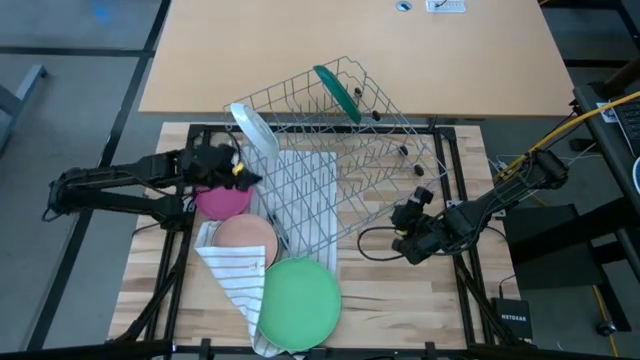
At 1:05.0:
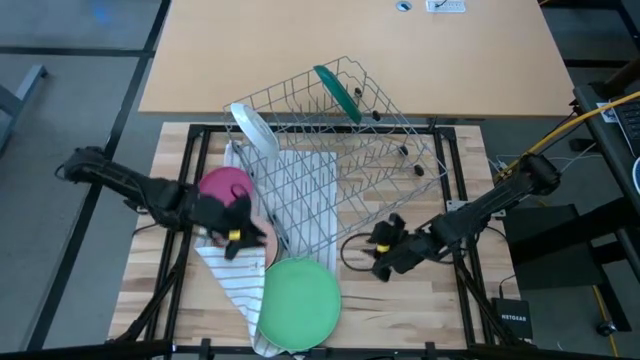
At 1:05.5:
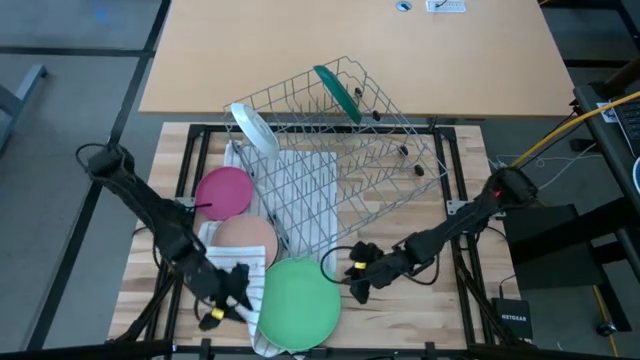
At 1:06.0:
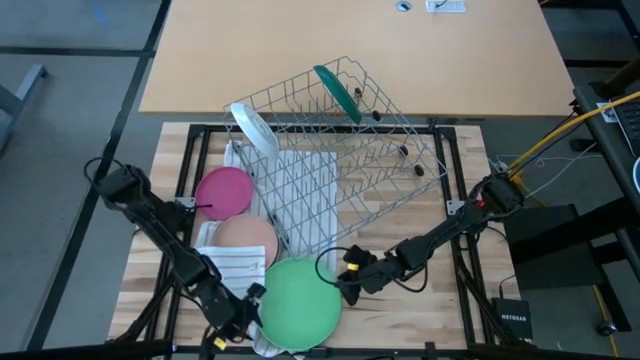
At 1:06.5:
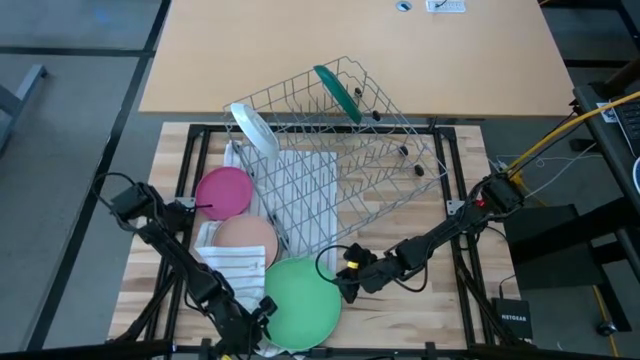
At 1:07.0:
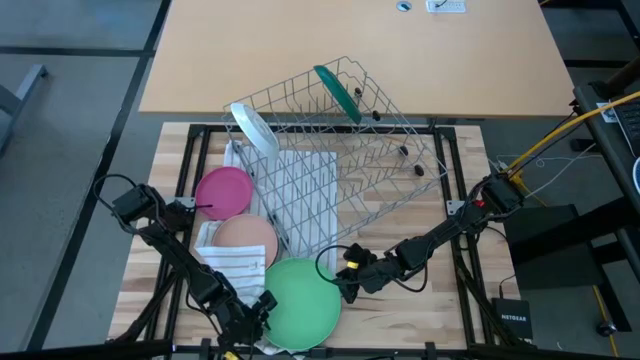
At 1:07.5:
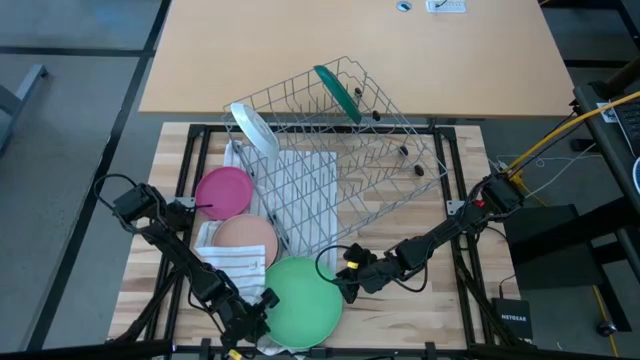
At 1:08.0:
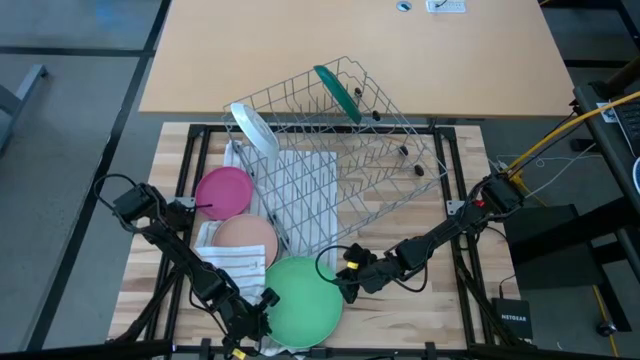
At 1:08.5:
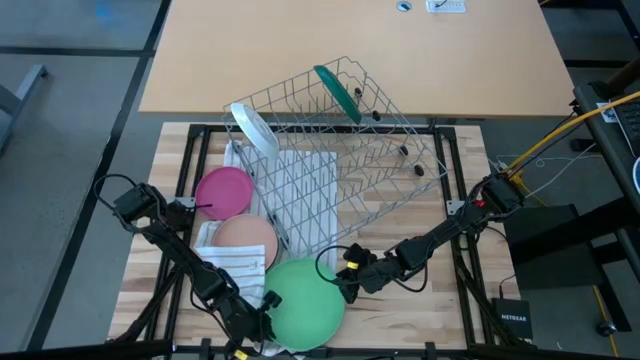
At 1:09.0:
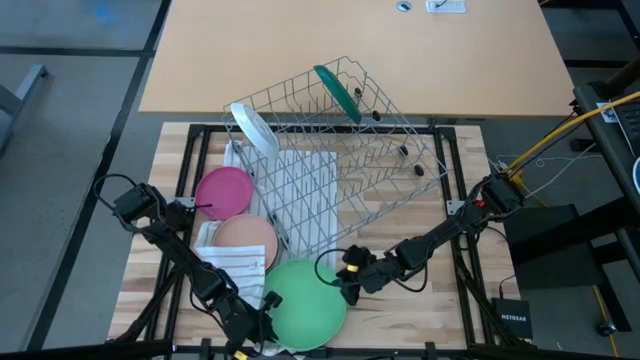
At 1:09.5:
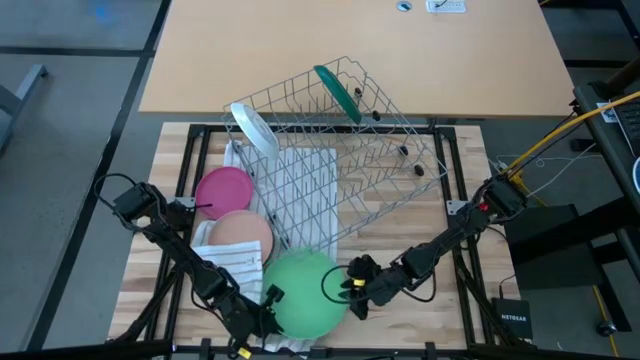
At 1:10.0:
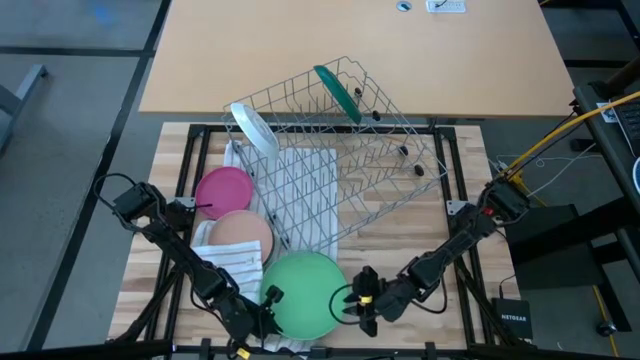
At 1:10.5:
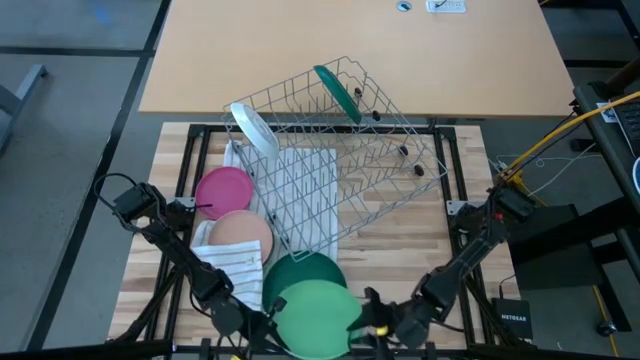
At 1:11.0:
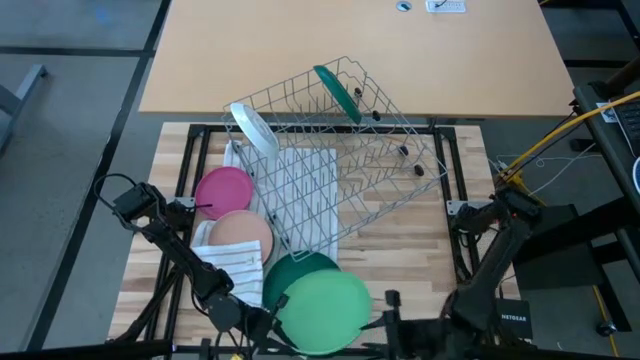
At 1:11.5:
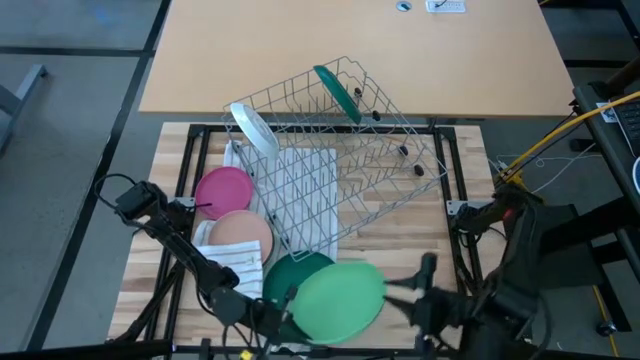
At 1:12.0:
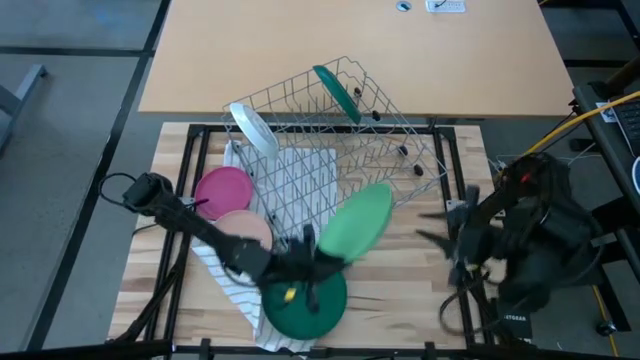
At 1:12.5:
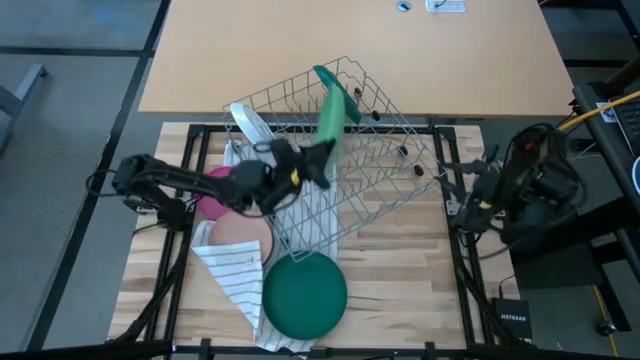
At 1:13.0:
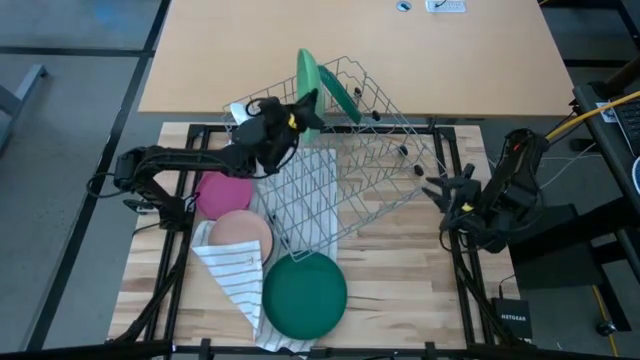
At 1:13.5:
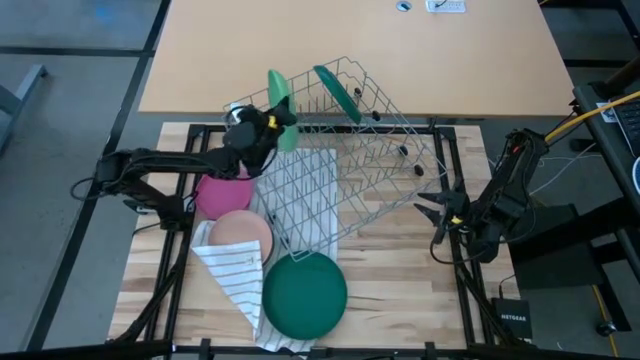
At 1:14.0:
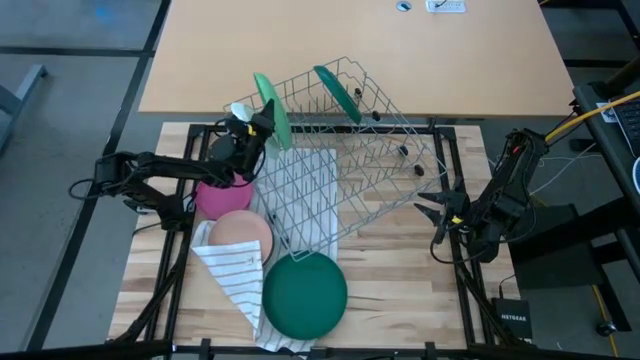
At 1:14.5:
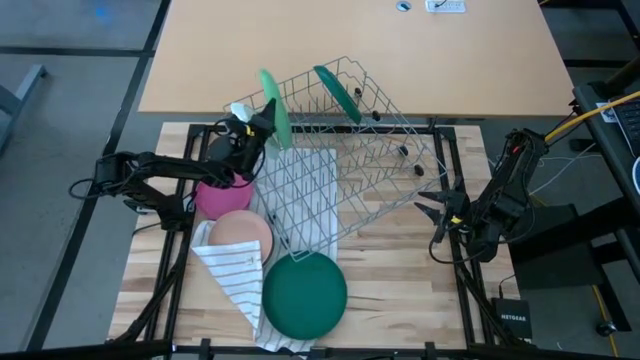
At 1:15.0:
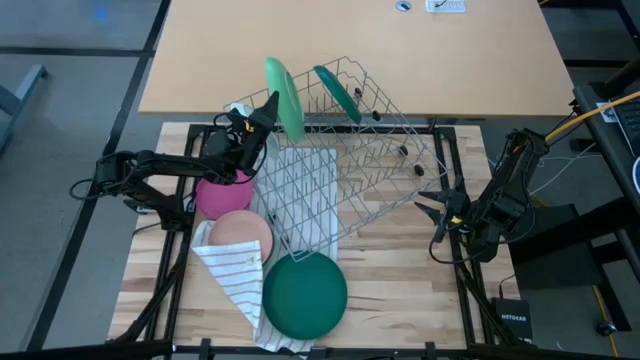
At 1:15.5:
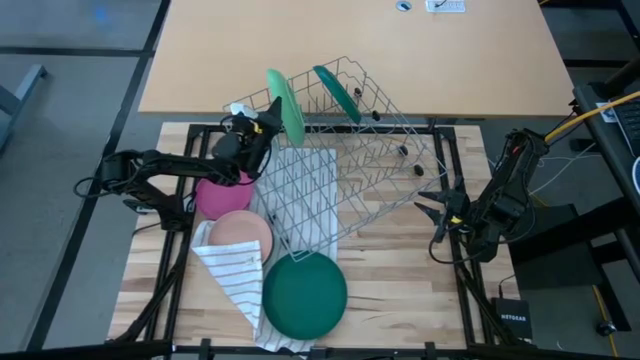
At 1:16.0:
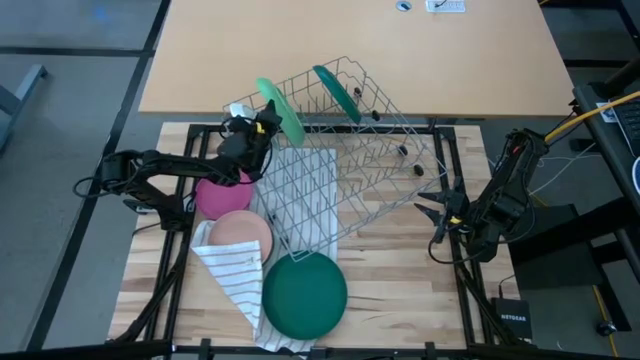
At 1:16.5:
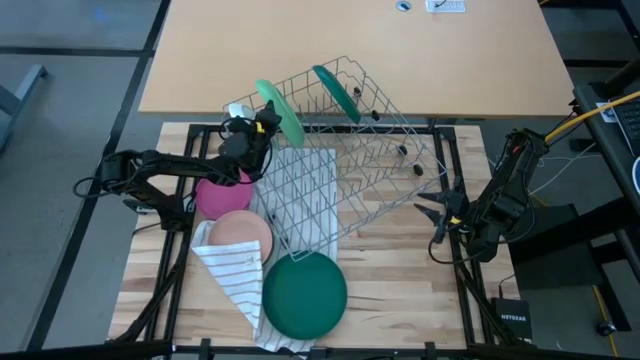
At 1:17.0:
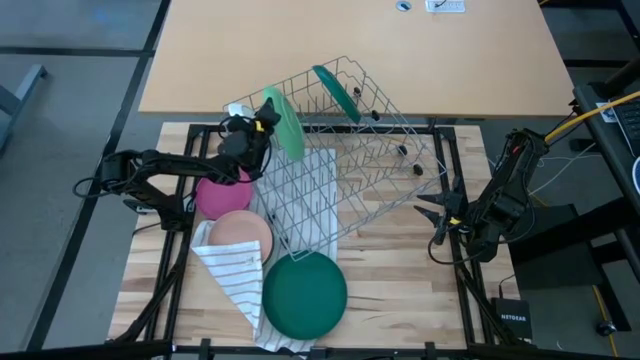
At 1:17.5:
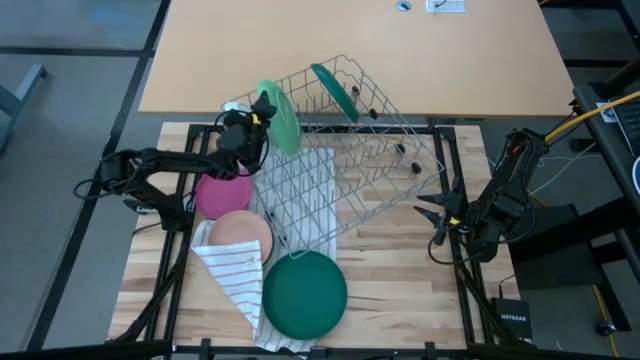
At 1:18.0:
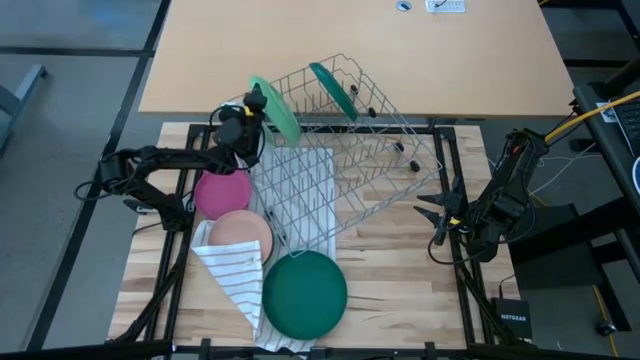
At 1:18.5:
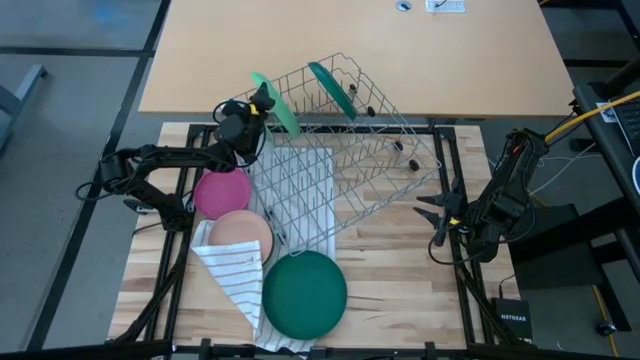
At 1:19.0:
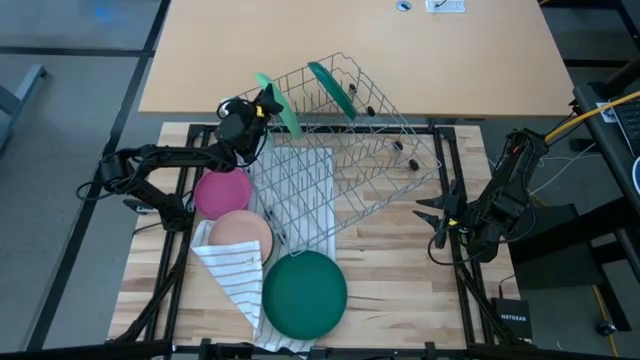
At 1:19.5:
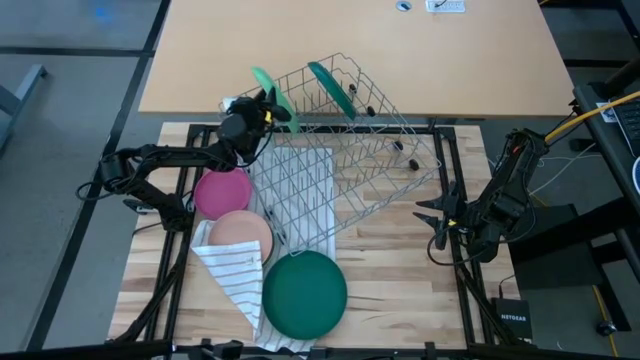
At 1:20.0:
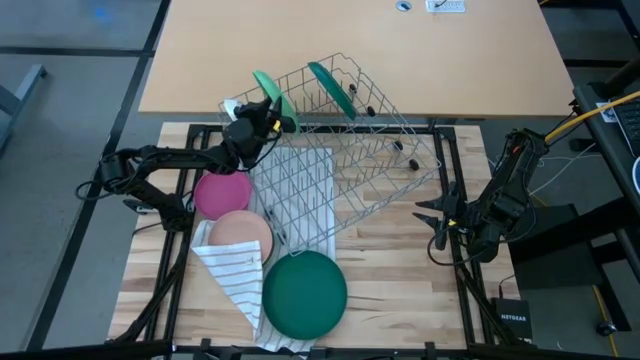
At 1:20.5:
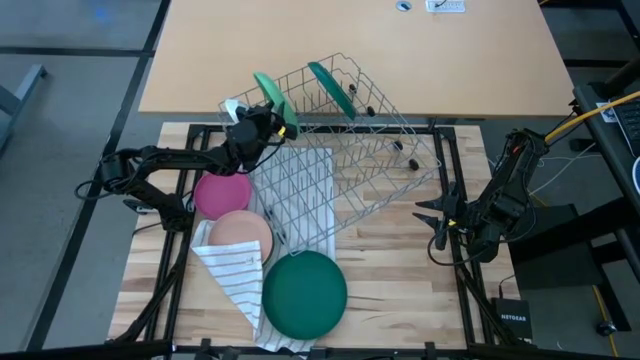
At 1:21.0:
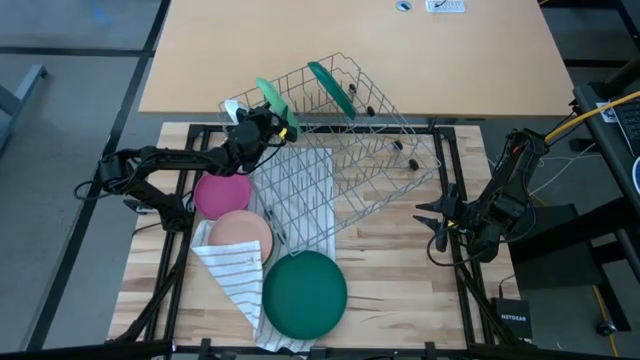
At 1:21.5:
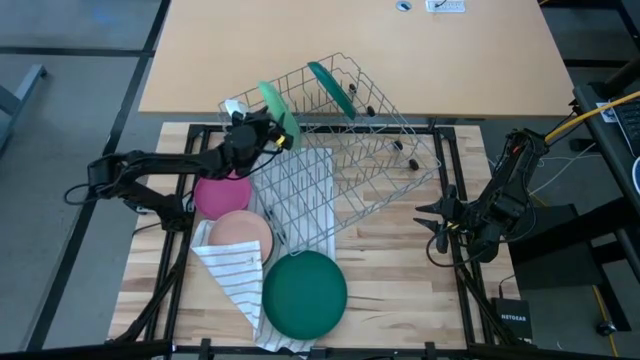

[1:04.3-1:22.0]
Task: Sort dishes
Put the light green plate in the dish rack
